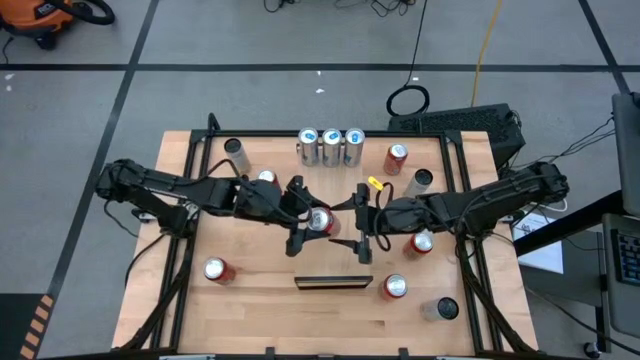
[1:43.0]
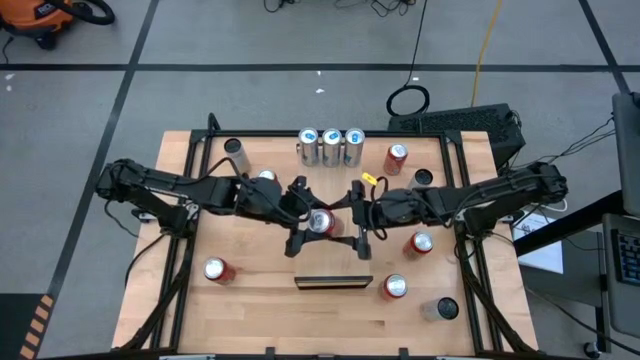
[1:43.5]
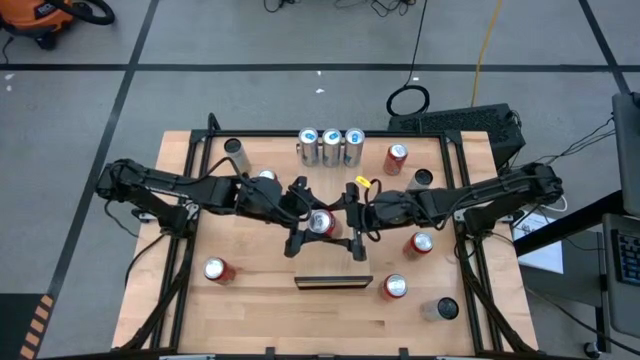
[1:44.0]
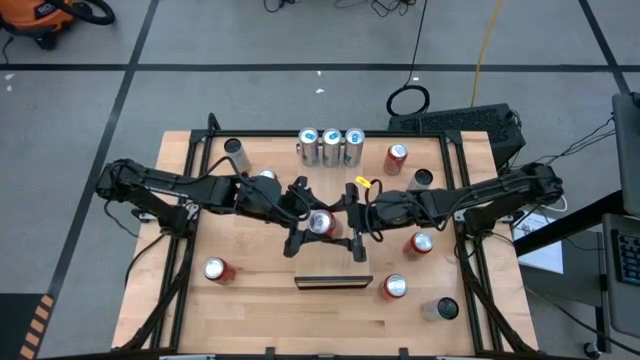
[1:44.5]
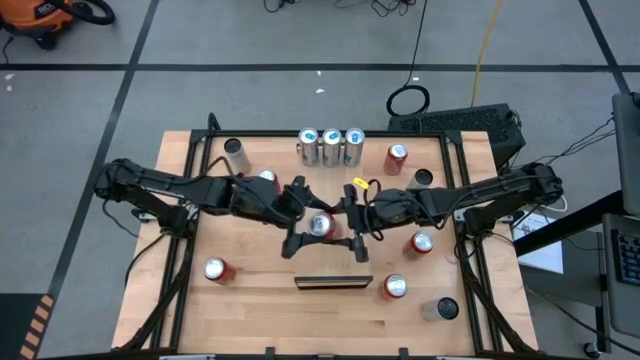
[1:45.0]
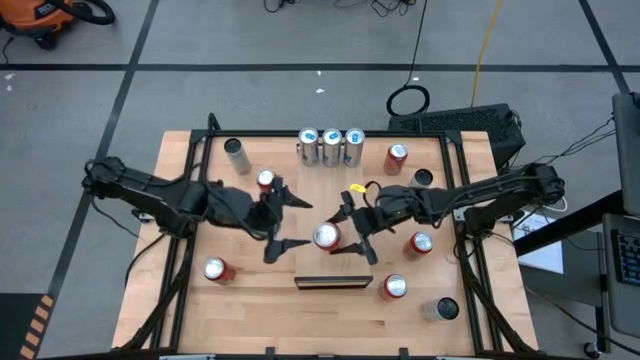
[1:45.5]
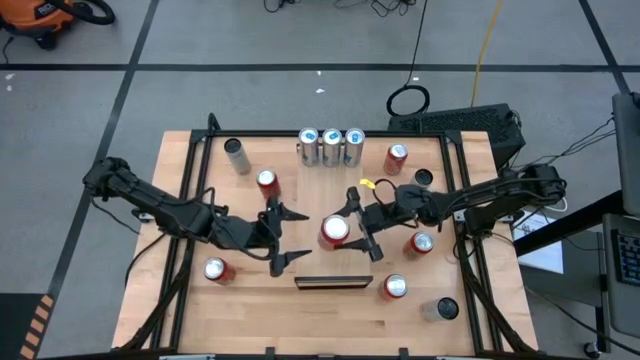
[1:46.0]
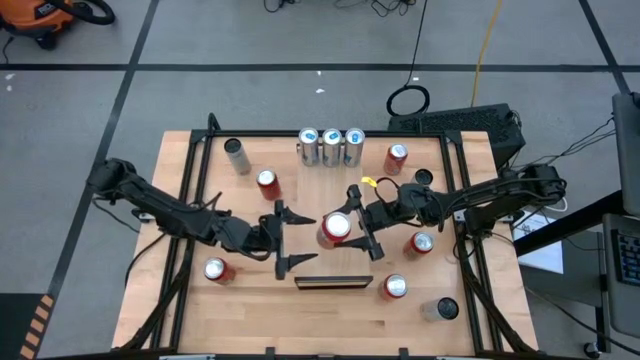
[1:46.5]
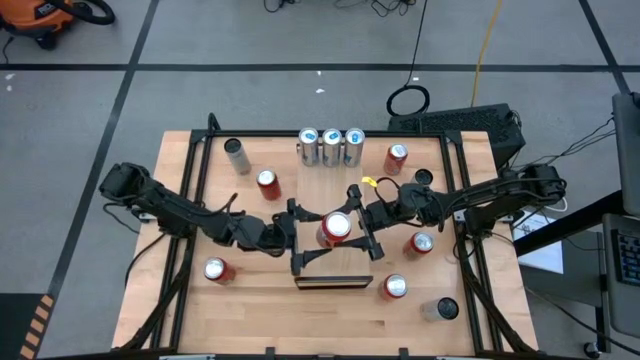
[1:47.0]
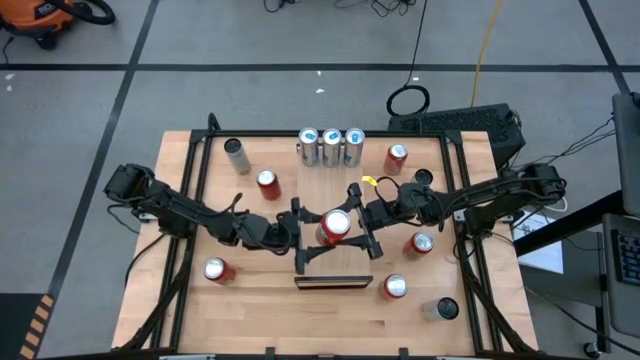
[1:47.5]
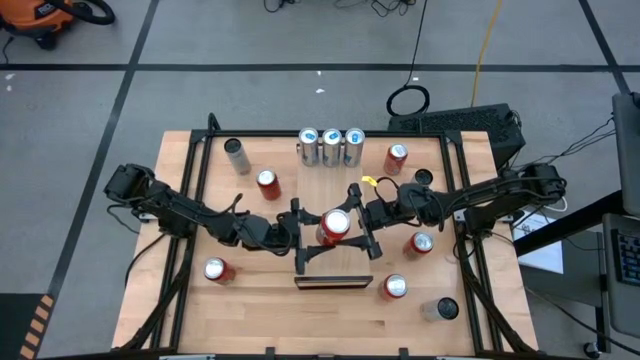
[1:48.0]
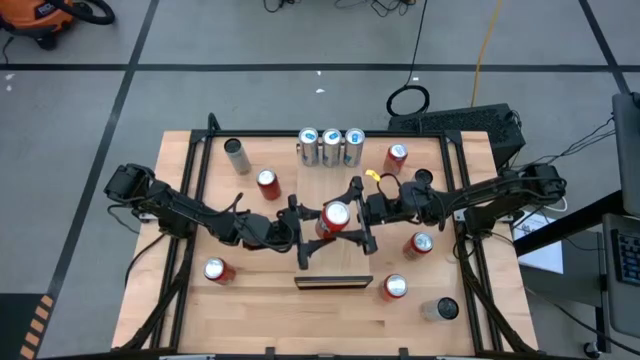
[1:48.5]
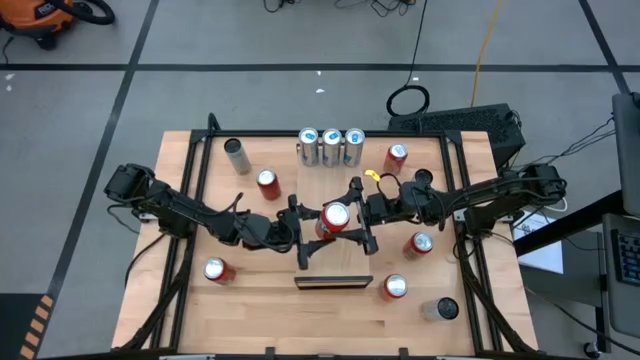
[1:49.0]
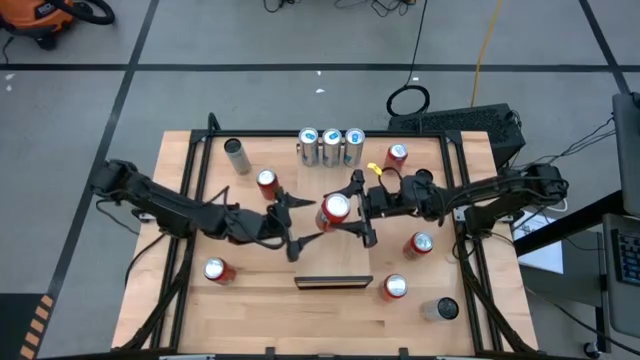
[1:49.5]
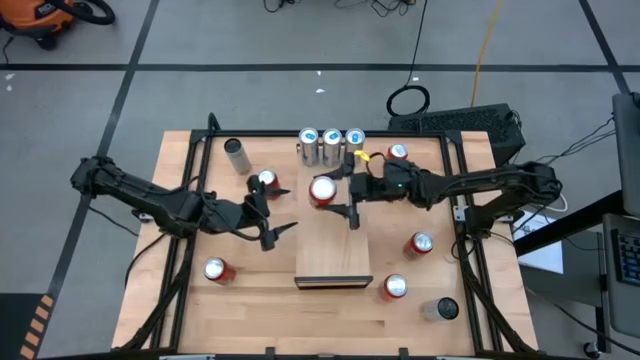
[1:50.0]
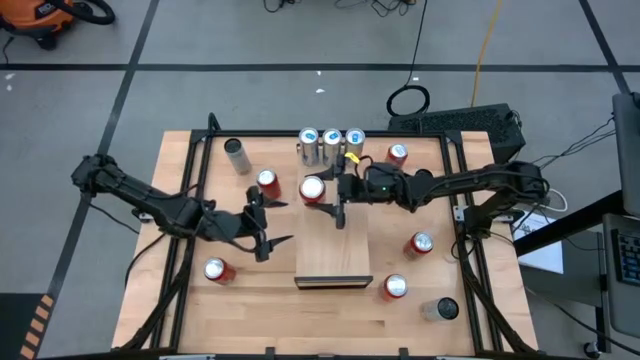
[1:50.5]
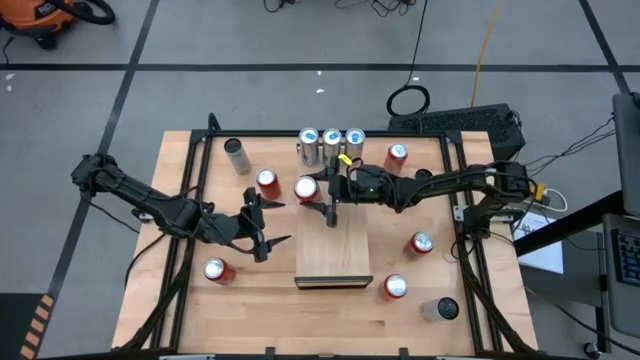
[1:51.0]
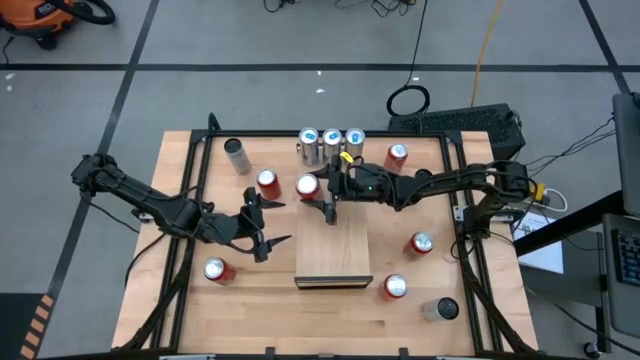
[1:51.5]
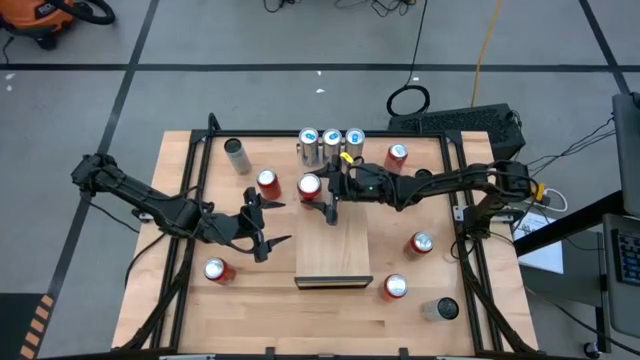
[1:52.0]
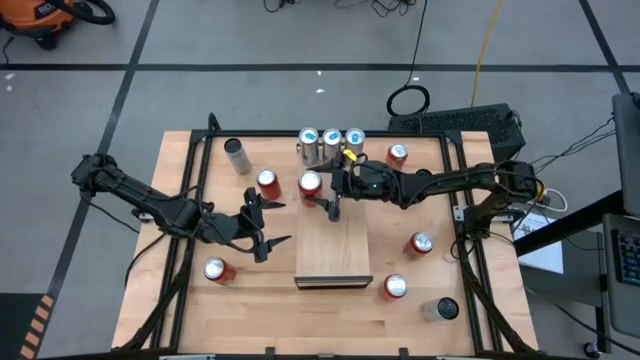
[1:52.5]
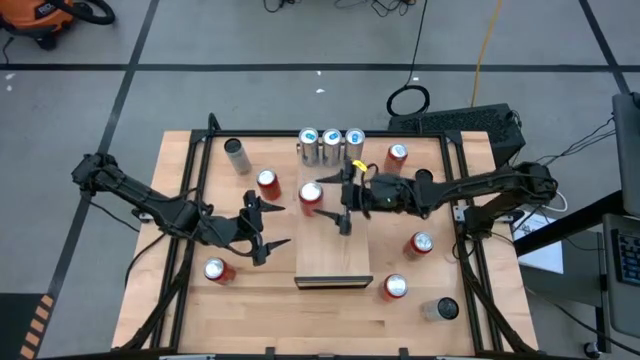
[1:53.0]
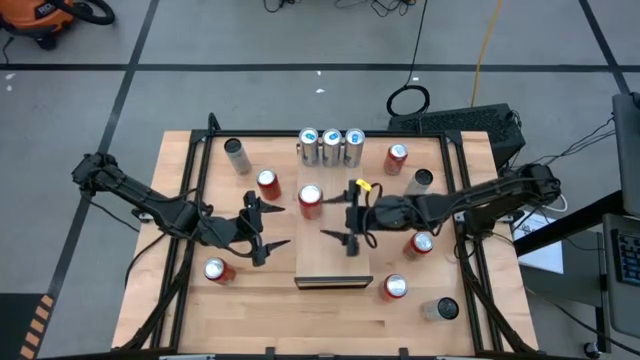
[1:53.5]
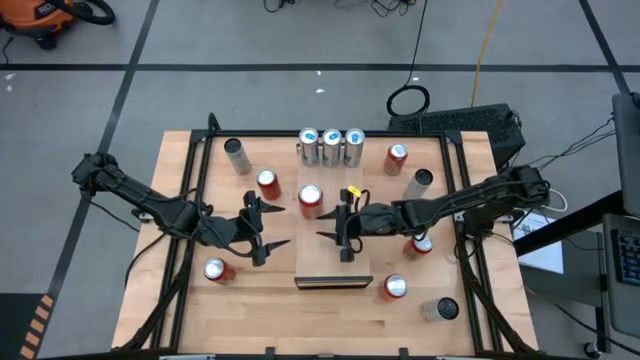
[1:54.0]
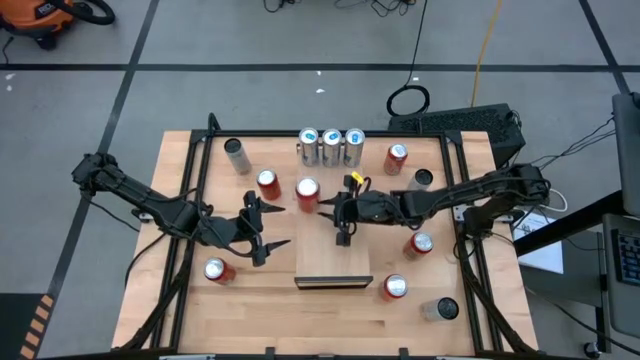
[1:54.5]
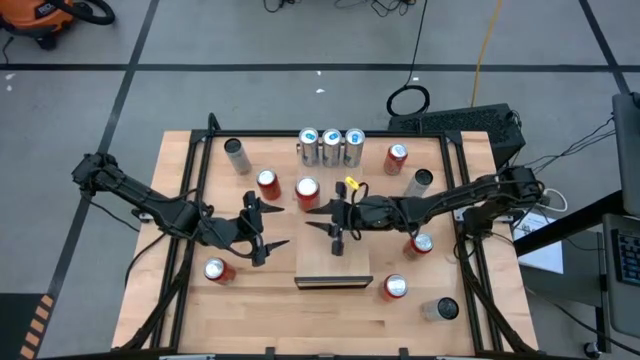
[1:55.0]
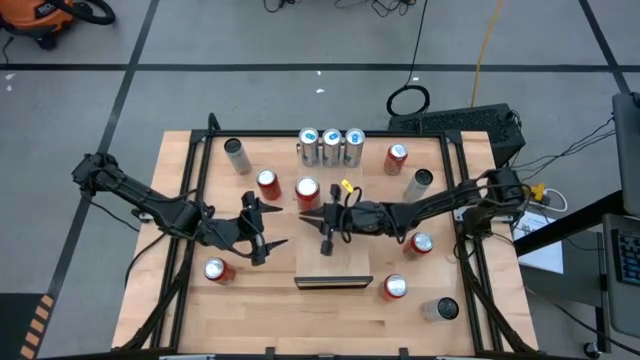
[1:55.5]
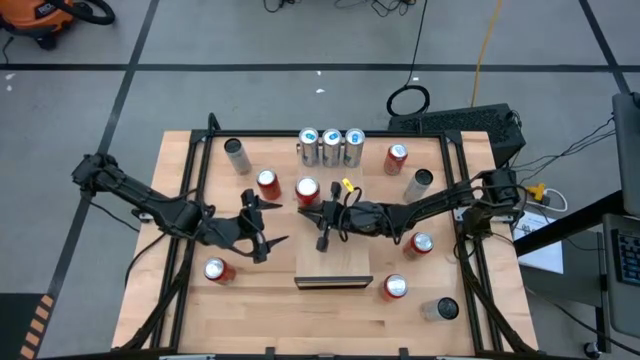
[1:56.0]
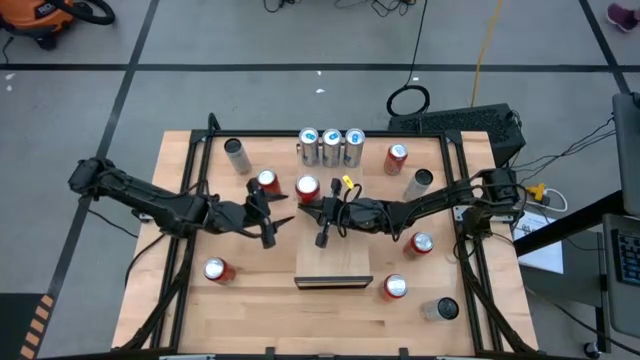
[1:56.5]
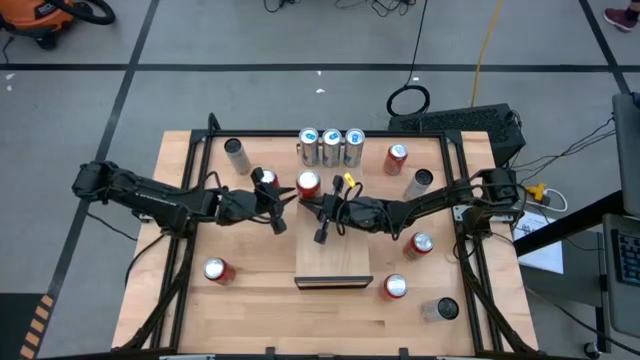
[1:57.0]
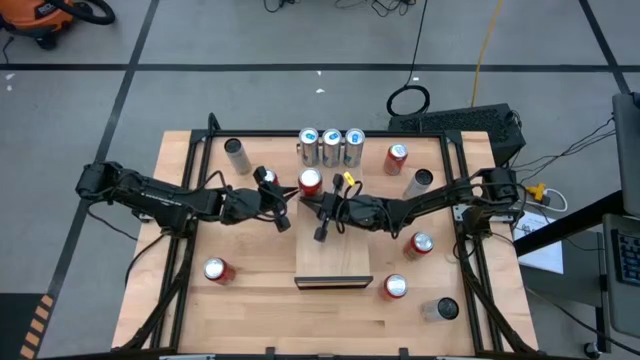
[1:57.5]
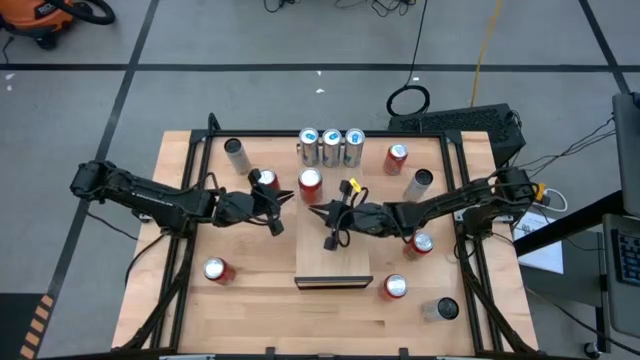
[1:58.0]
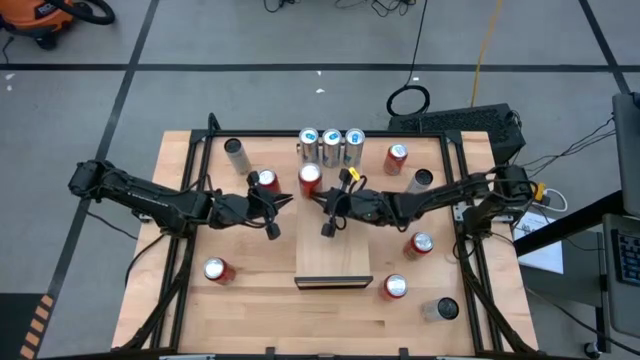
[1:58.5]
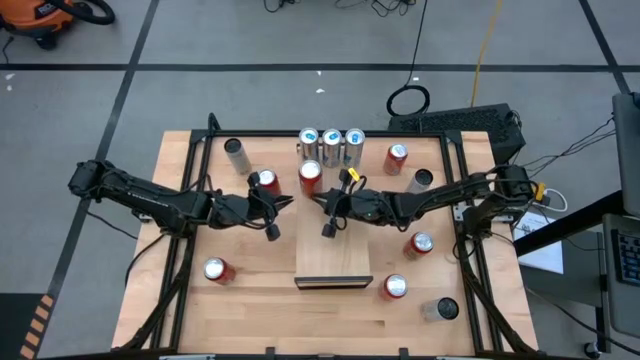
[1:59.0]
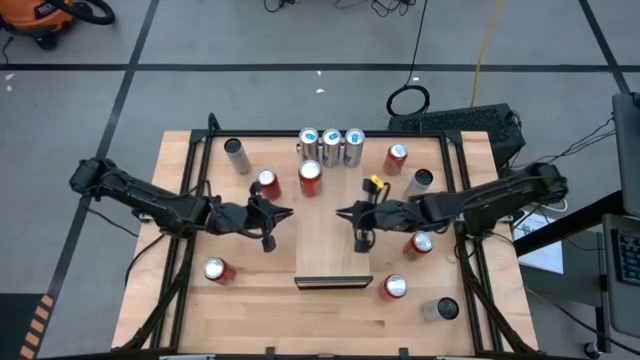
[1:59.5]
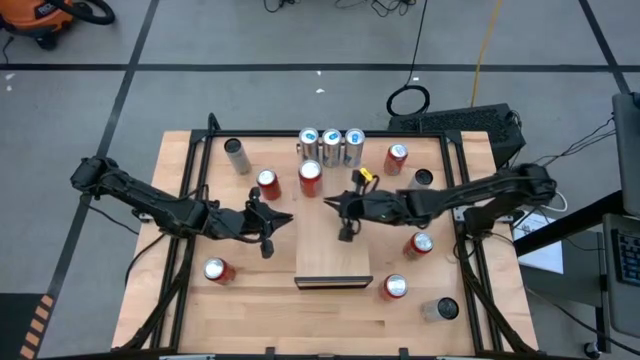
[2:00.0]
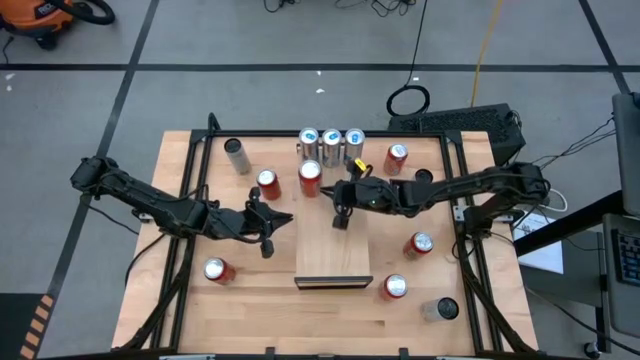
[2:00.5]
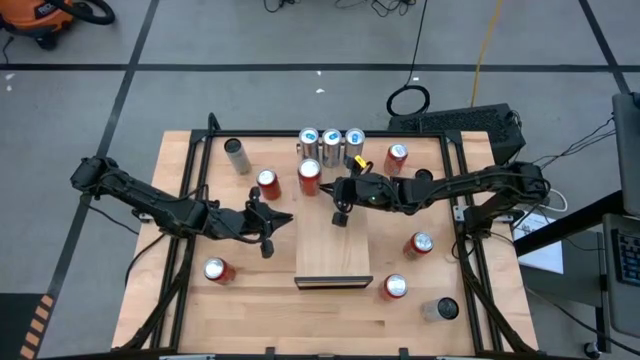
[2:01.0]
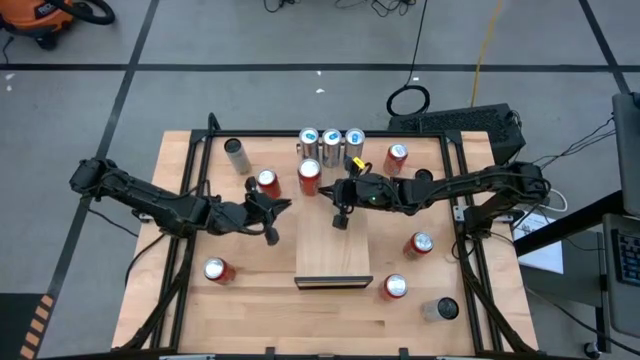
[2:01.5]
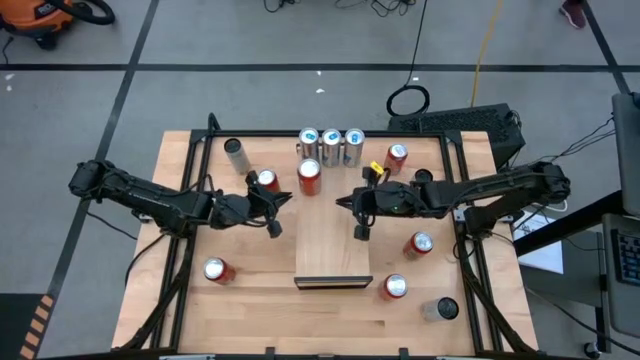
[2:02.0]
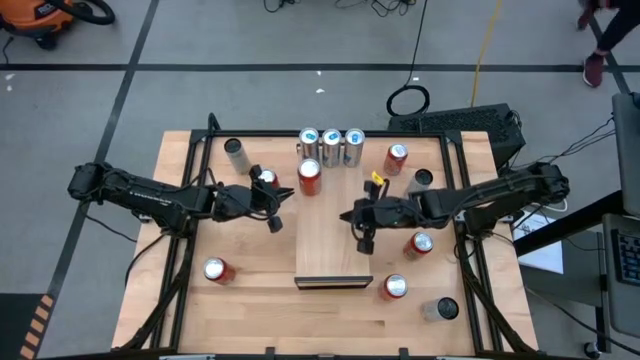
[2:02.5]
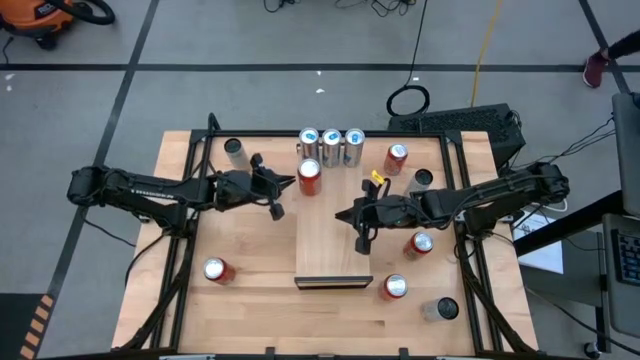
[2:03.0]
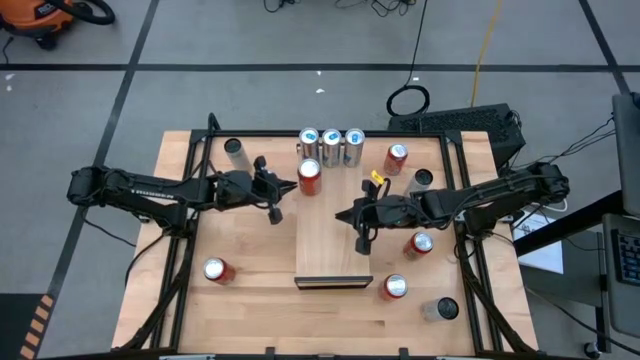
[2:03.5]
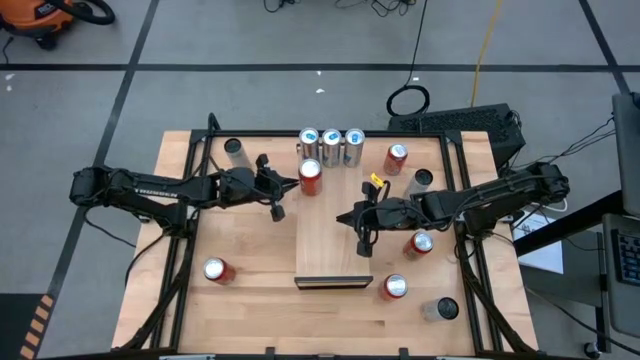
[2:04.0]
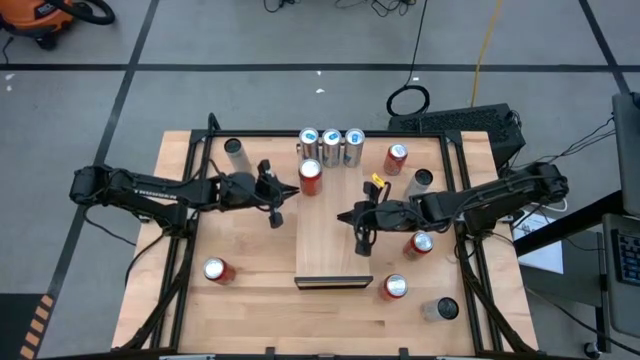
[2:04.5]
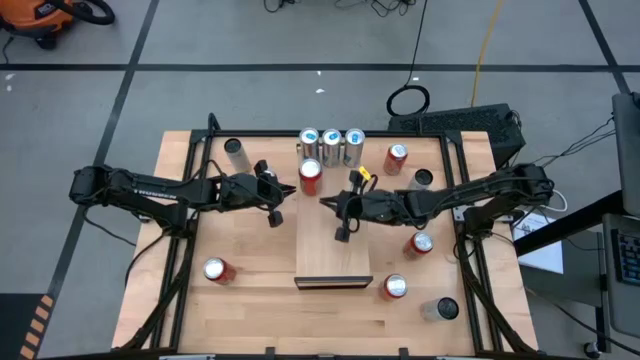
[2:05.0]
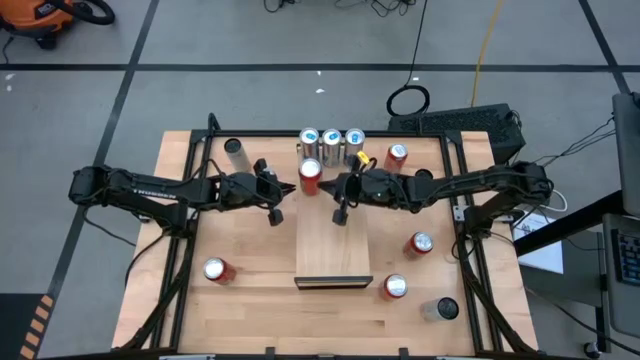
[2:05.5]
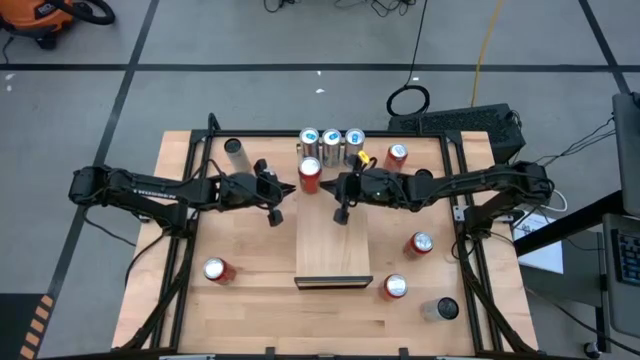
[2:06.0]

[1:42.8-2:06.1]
Task: Place canned beverage on shelf
Put the middle red soda can on the shelf
